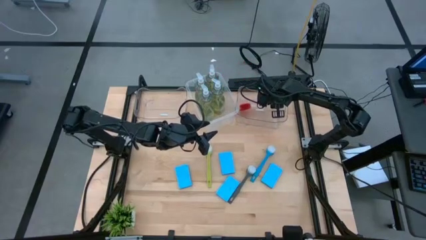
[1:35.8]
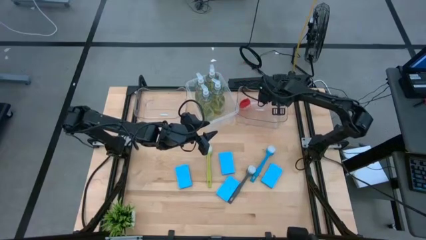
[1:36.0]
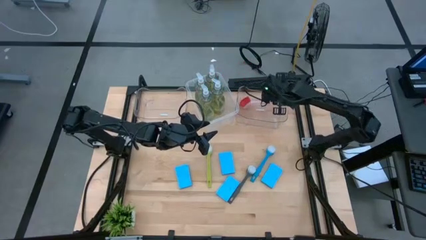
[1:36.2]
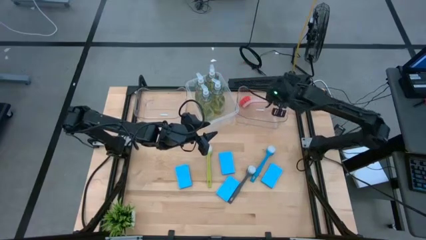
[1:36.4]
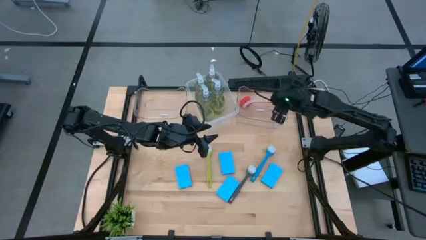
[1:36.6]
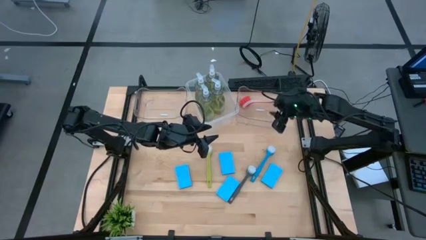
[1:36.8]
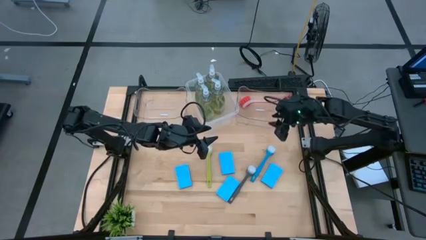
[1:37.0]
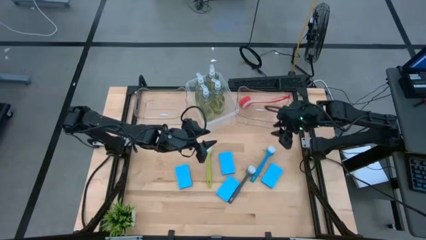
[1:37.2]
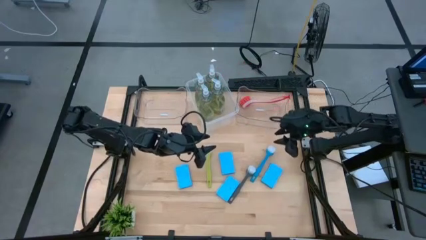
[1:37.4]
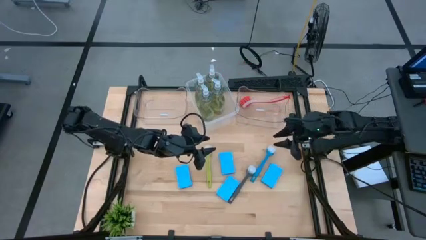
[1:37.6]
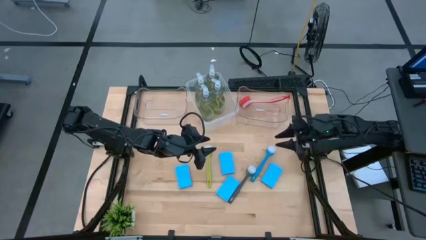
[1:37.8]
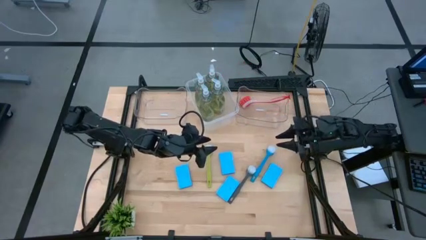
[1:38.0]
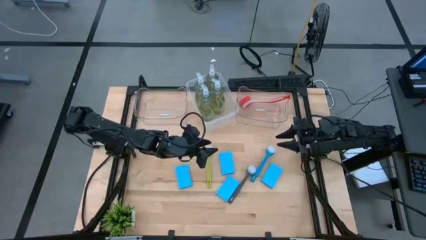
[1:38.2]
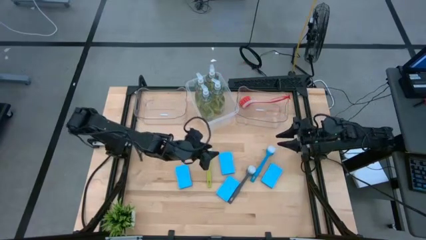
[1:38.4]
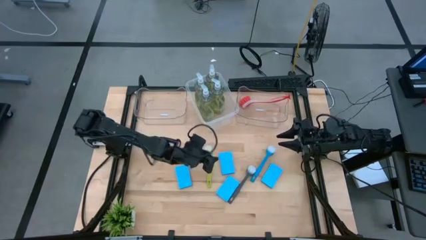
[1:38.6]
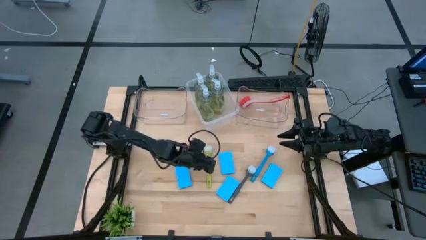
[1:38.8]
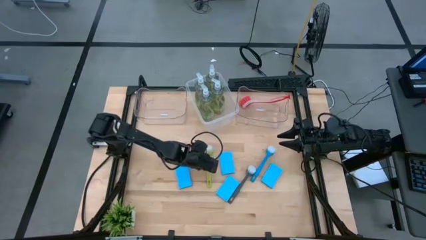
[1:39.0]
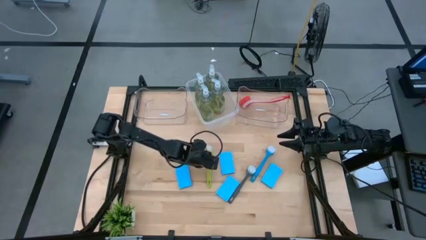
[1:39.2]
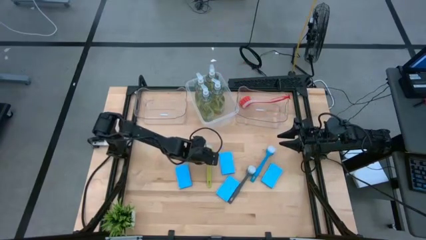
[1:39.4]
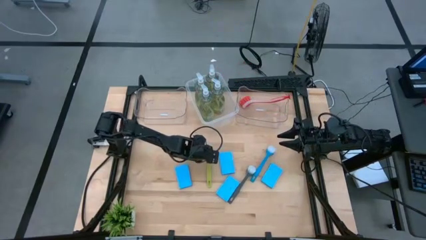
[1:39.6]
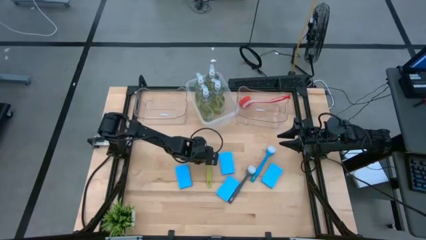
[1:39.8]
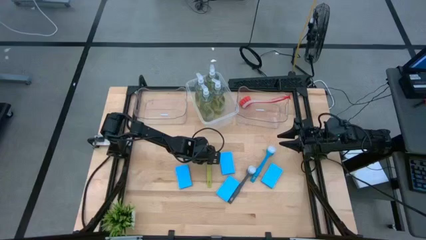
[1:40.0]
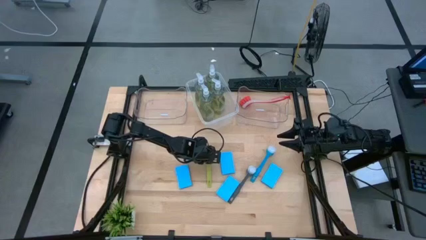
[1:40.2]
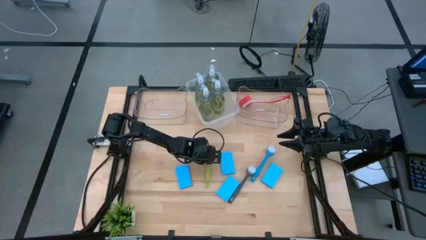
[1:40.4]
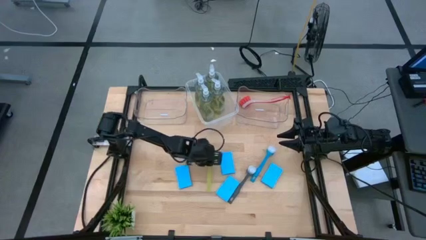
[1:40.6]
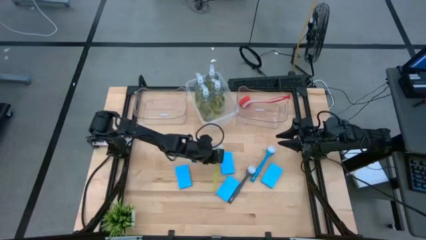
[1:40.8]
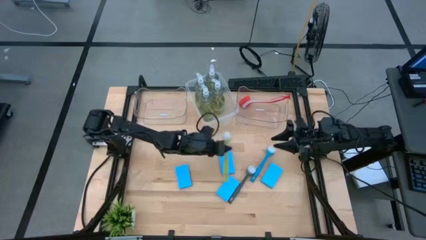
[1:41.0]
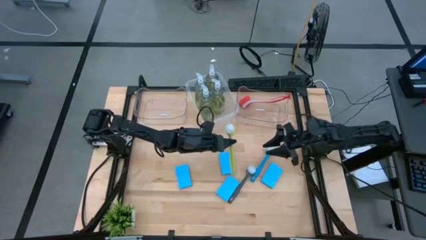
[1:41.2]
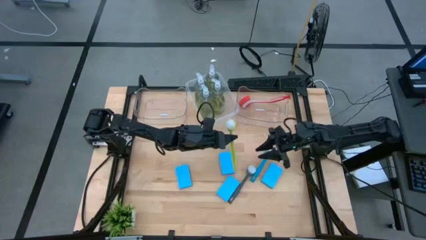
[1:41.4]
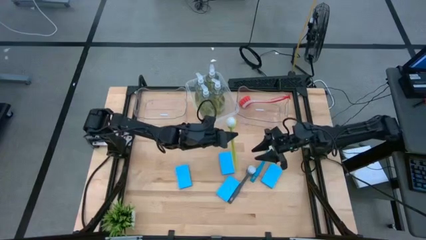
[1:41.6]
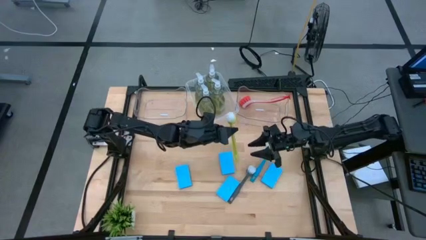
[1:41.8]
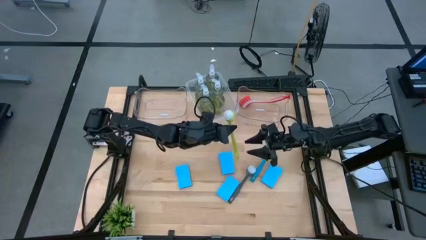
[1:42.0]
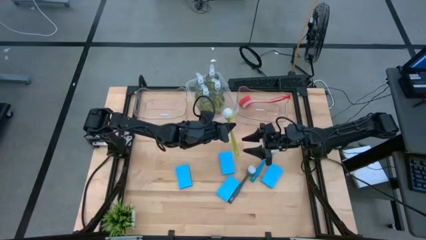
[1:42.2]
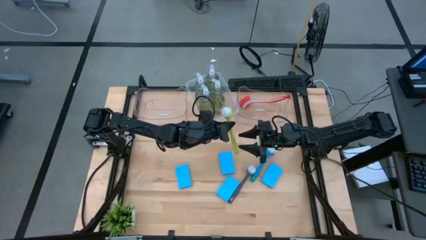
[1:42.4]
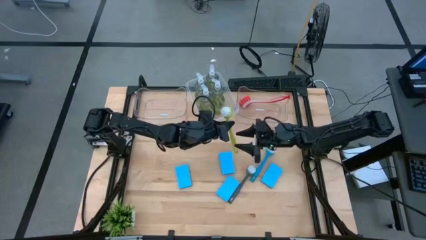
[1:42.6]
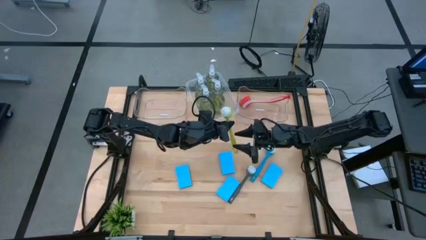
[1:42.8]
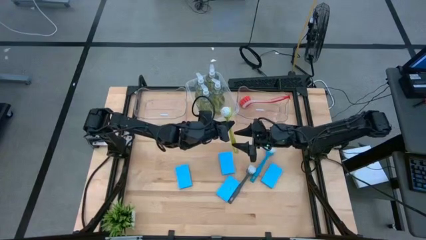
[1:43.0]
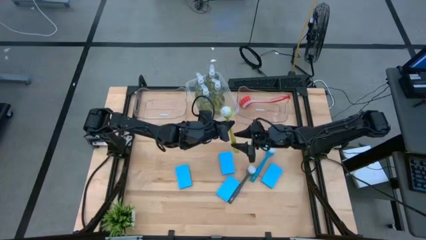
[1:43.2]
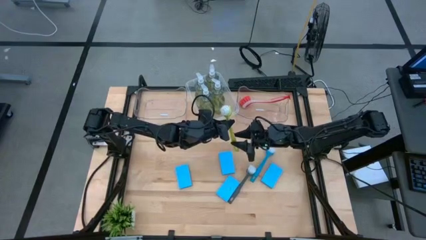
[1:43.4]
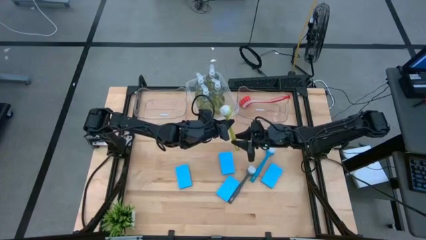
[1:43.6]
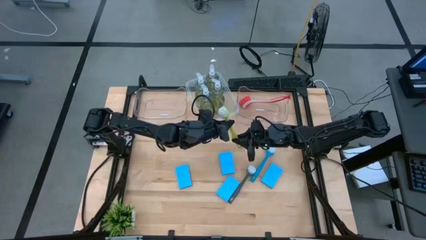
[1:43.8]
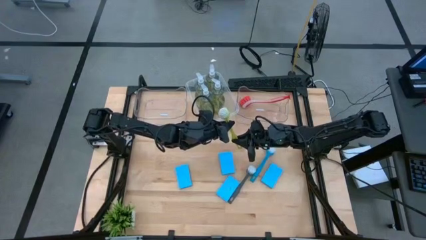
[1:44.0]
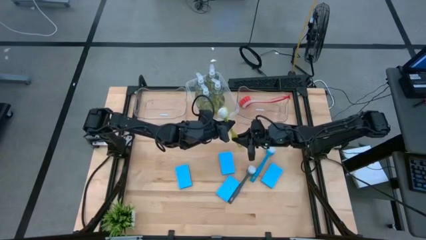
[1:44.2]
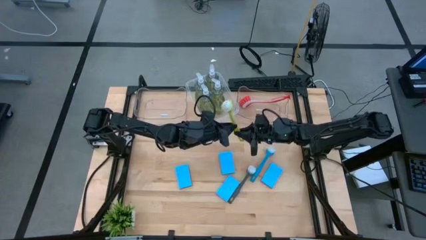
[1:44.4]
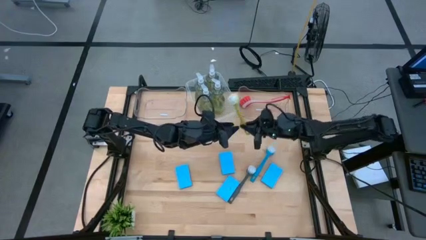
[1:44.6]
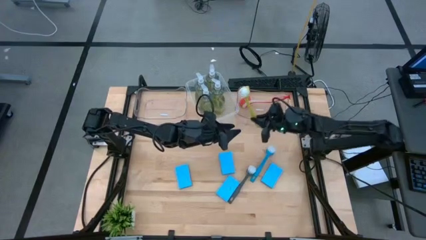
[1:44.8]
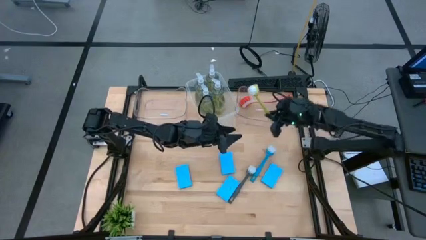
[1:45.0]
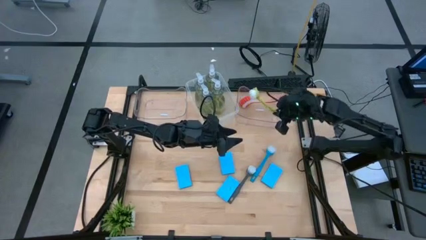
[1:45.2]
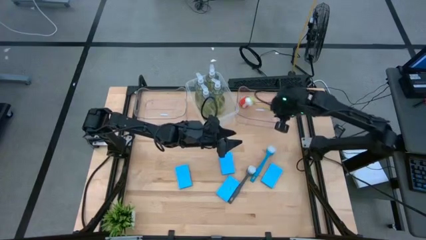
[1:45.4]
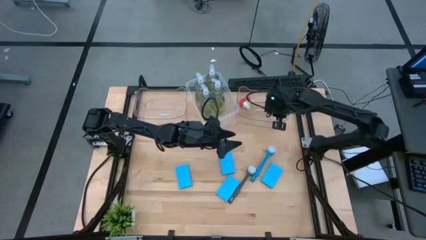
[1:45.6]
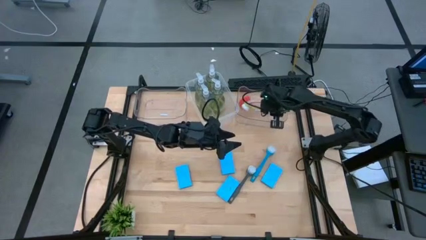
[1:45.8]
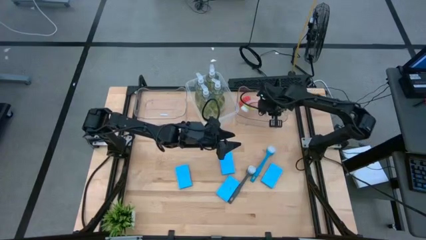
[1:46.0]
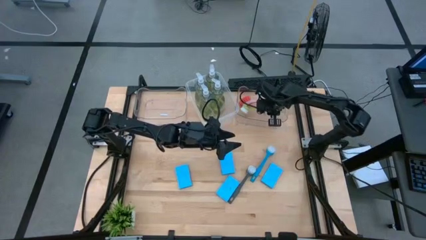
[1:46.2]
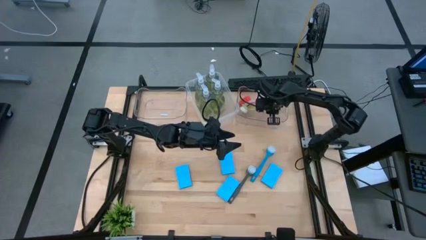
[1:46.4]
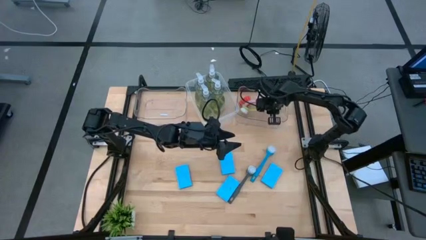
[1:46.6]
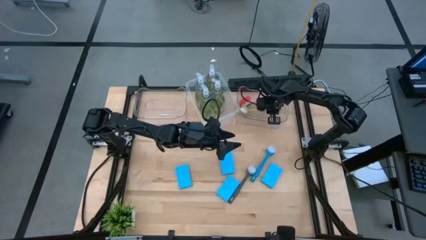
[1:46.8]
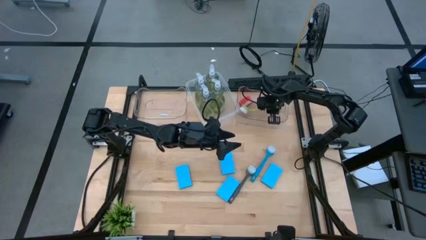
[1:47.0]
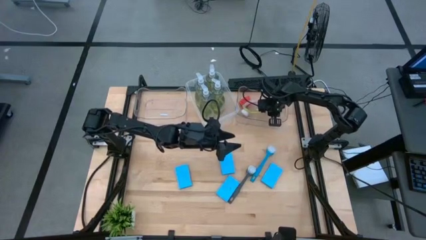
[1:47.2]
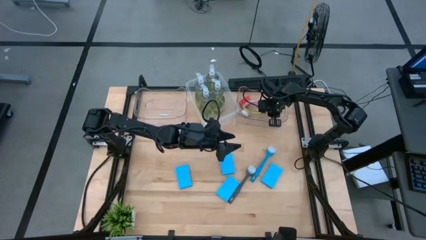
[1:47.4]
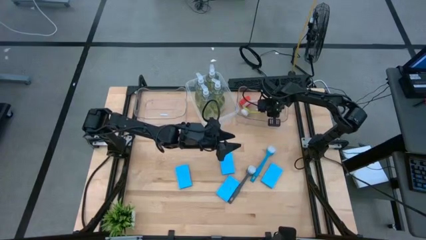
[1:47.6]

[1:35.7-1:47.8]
Task: Pick & Place Kitchen Sink Supplies
Put the green toilet brush into the right transparent bin
